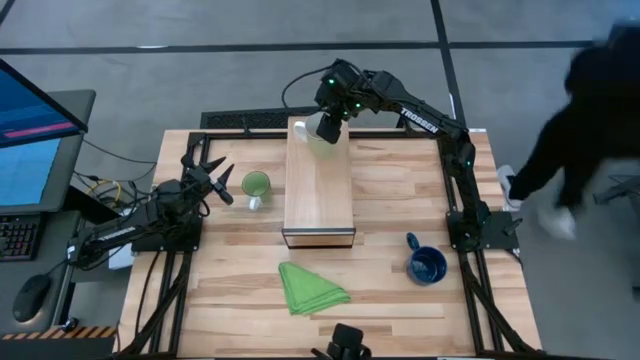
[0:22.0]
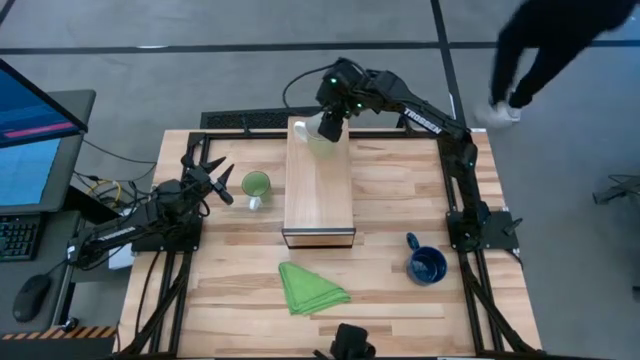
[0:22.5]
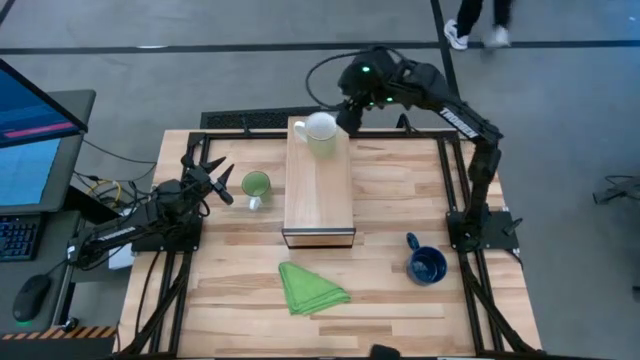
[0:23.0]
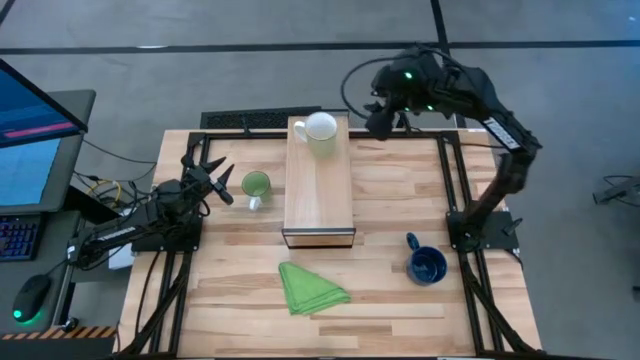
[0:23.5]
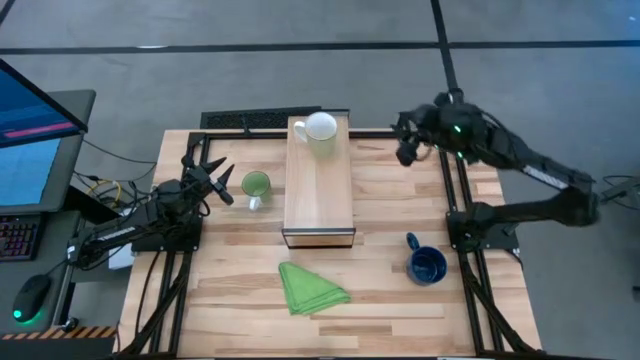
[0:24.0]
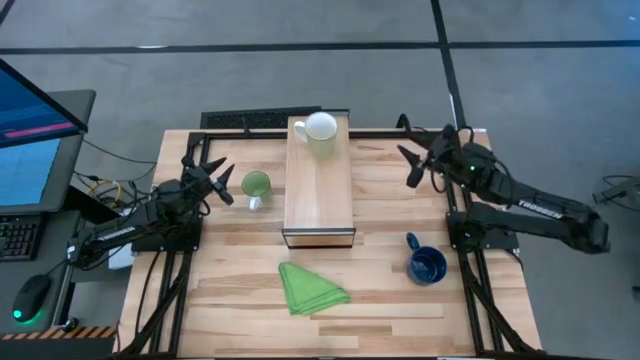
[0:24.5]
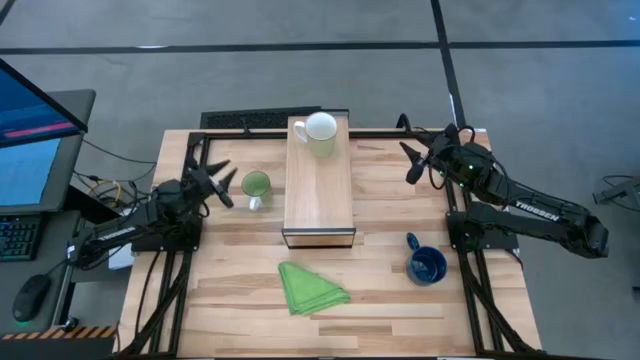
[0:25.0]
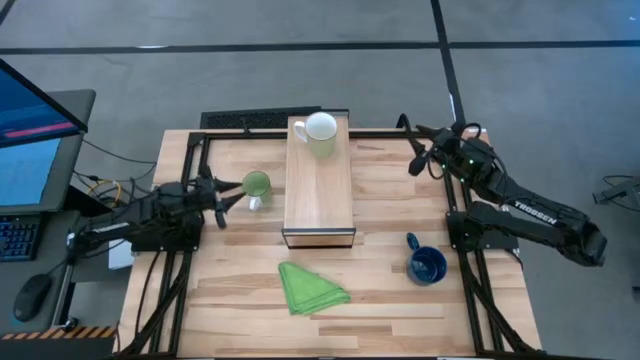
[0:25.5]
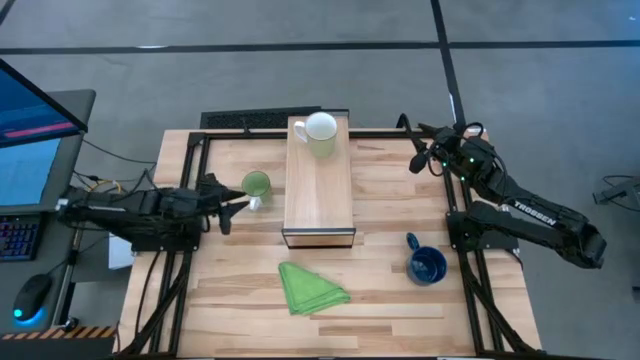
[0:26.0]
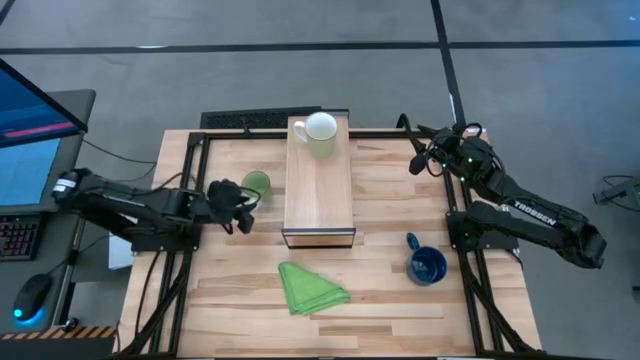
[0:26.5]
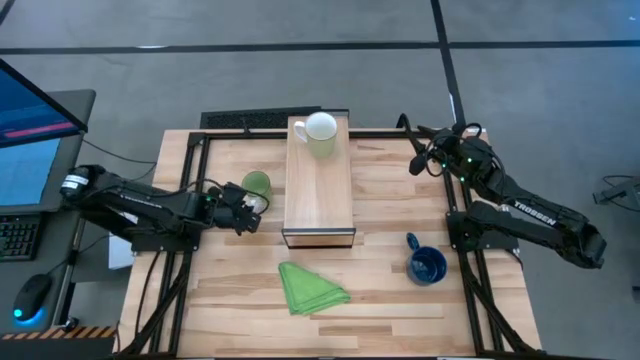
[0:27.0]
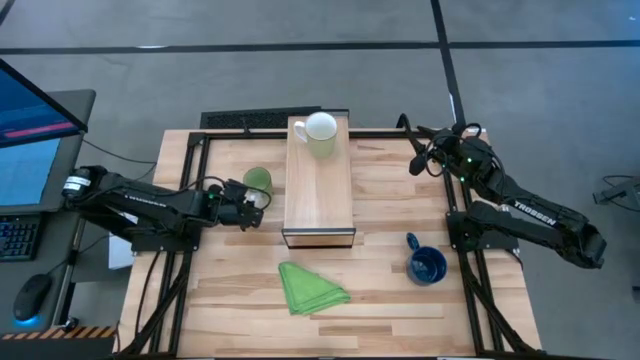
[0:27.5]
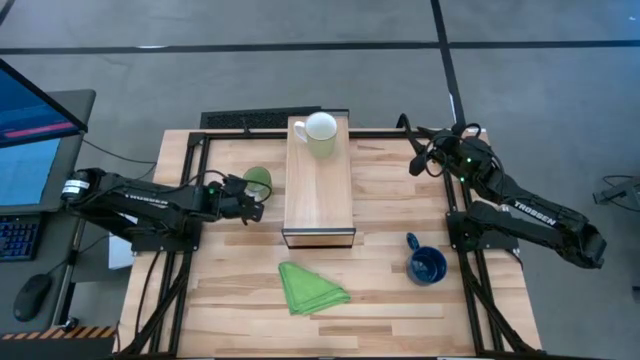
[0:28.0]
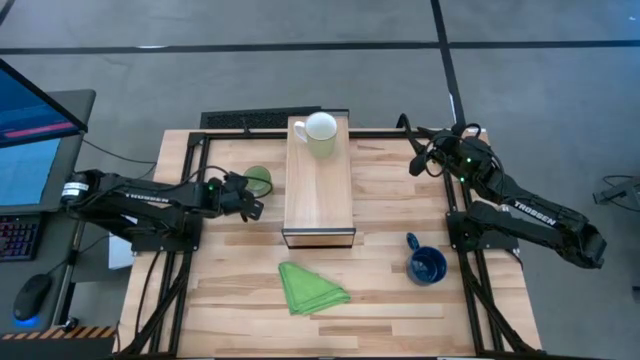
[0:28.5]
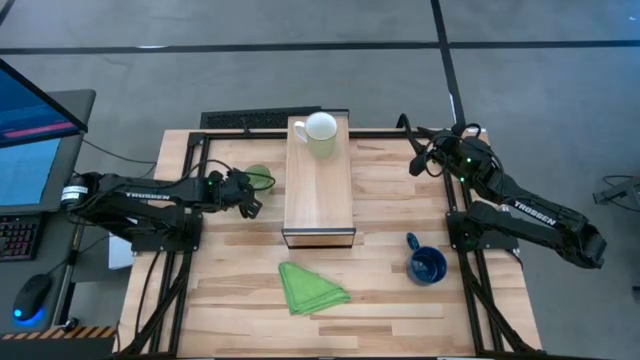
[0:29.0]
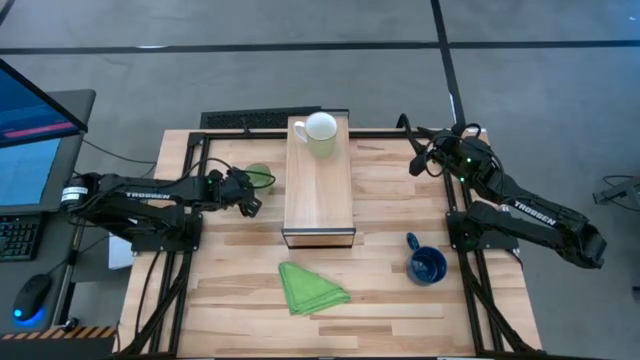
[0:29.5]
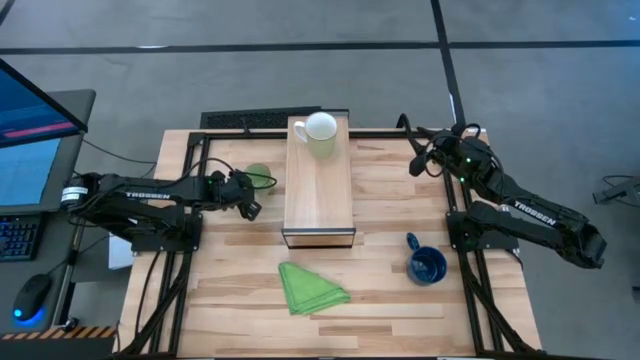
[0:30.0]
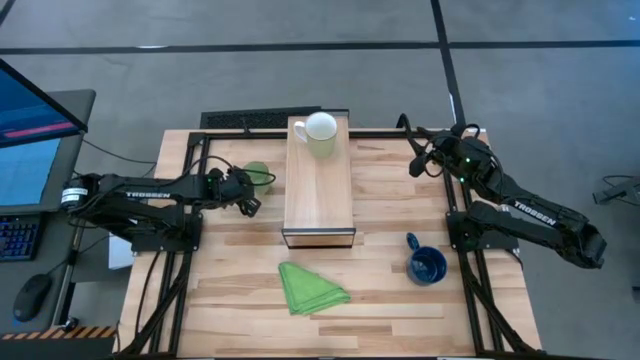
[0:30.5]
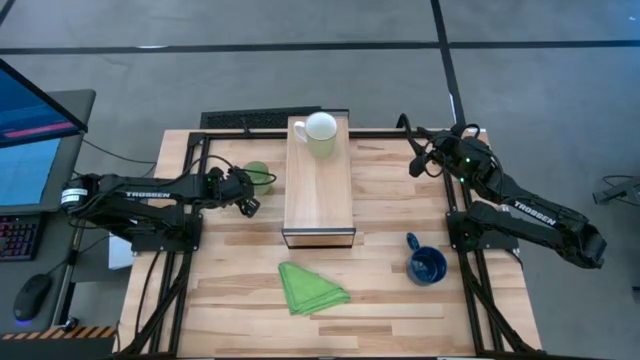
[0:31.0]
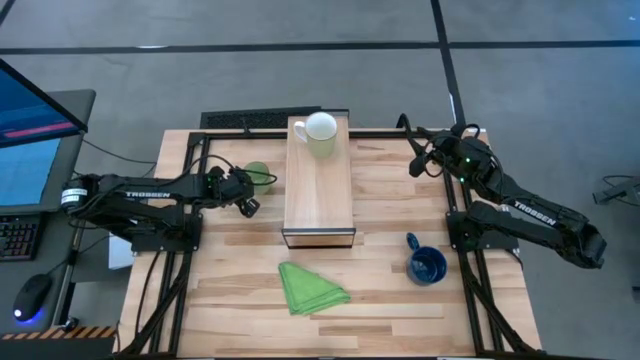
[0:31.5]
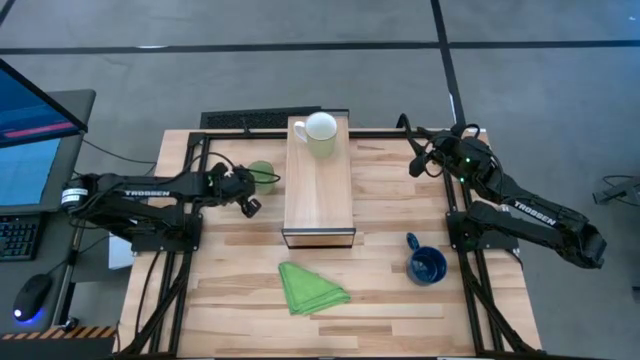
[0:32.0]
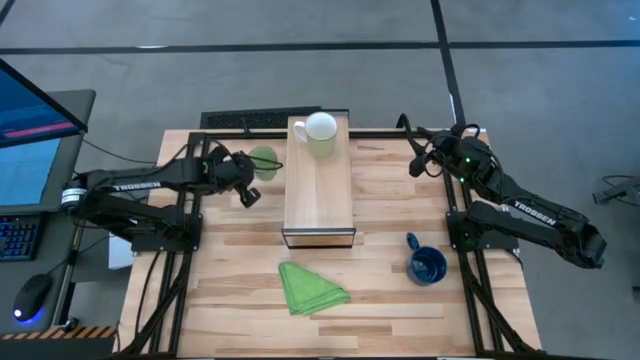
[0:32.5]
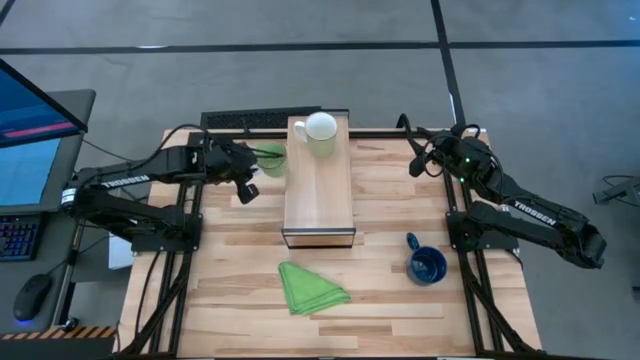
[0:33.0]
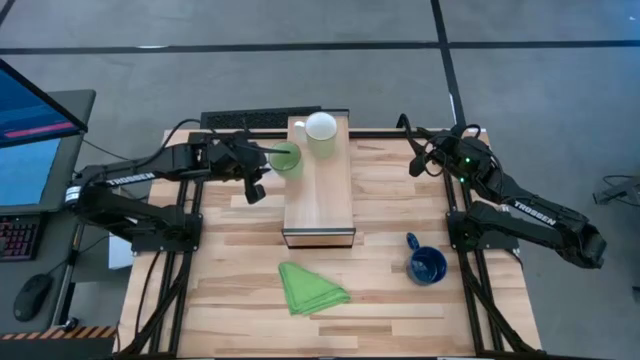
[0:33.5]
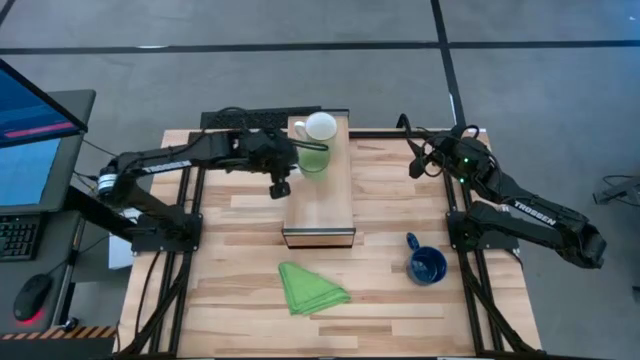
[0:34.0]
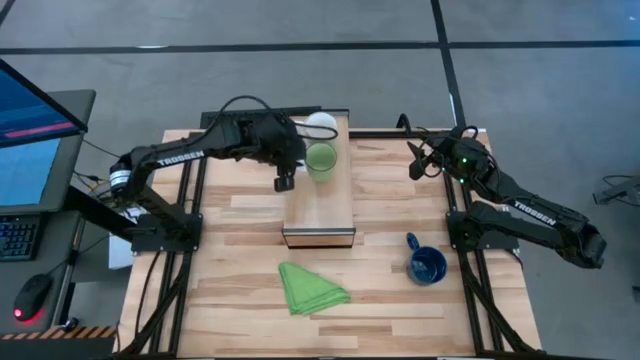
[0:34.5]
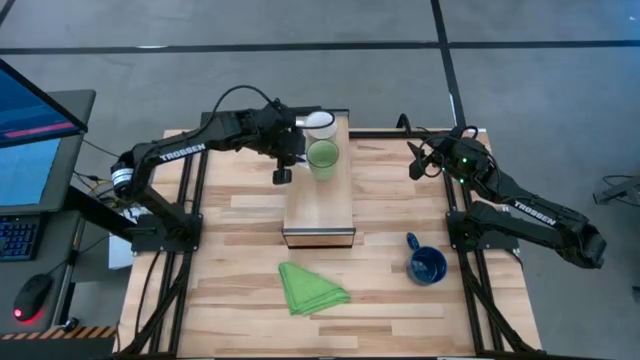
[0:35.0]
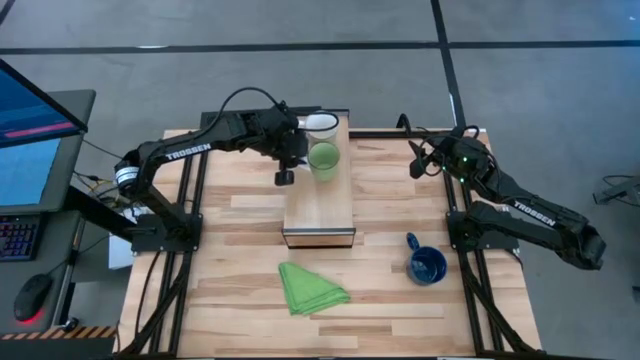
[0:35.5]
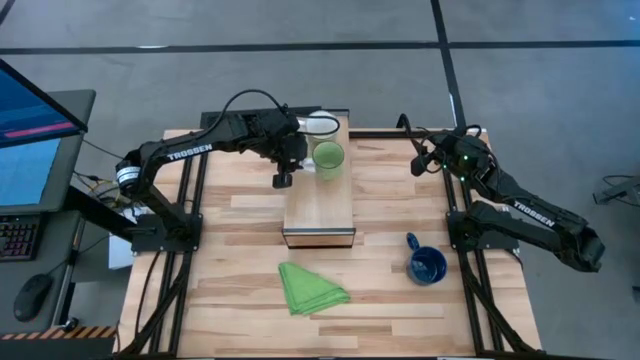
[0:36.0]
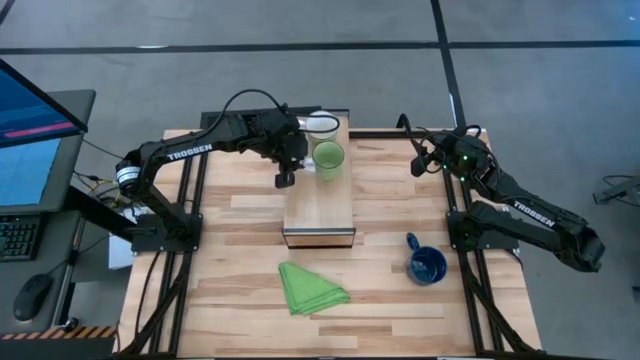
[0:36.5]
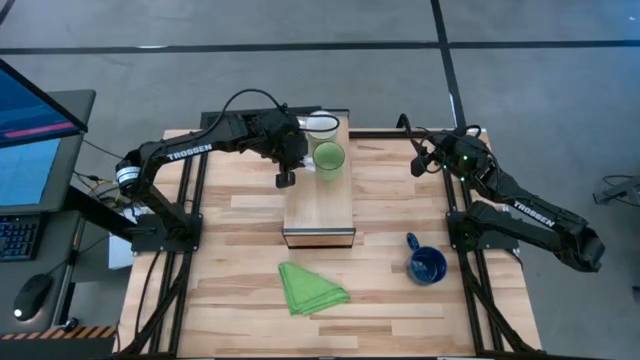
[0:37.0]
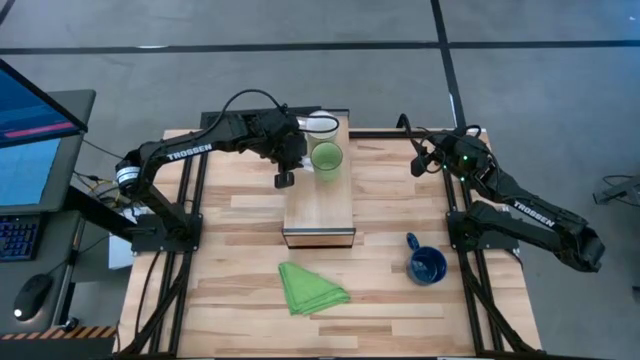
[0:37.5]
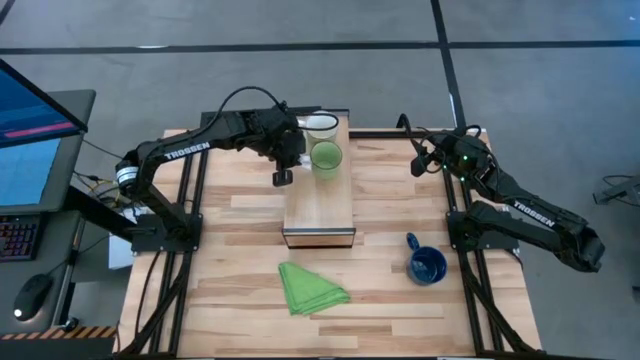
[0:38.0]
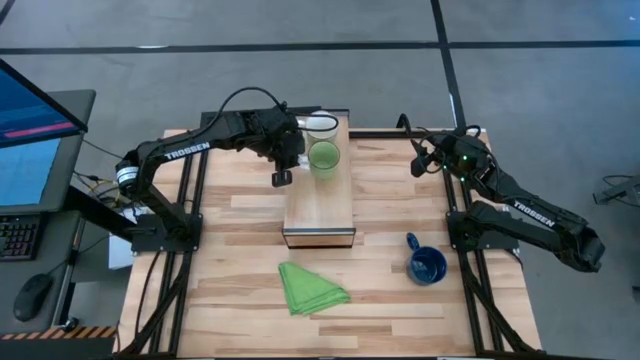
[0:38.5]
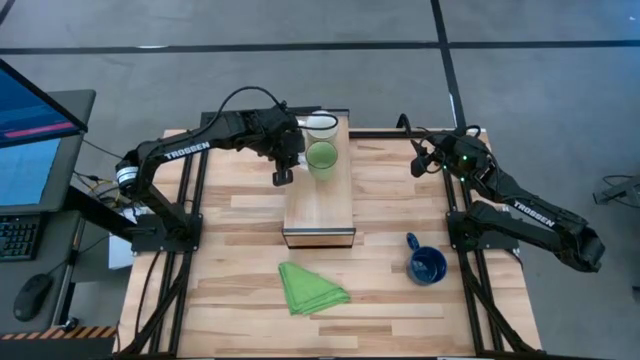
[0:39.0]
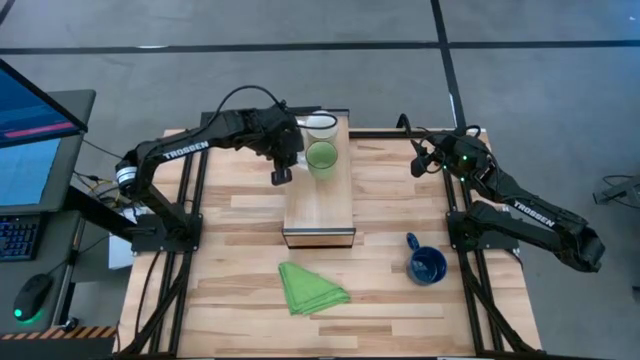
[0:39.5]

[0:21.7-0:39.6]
Task: Stack small to large cups/mugs on shelf
Put the green mug on the shelf

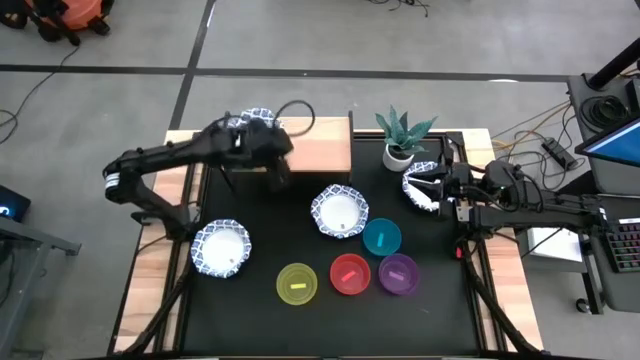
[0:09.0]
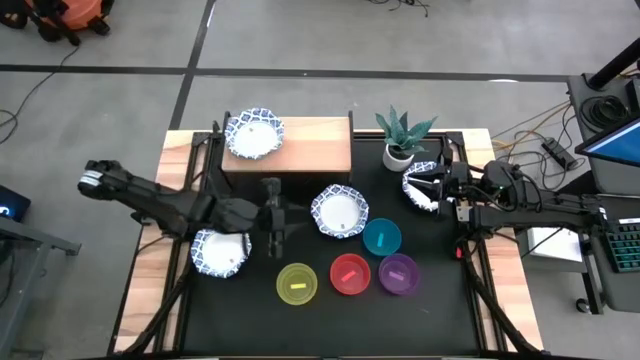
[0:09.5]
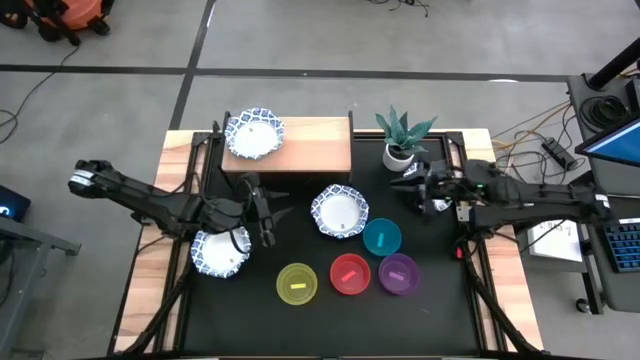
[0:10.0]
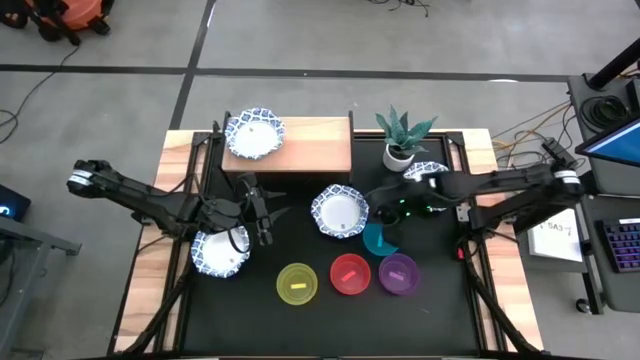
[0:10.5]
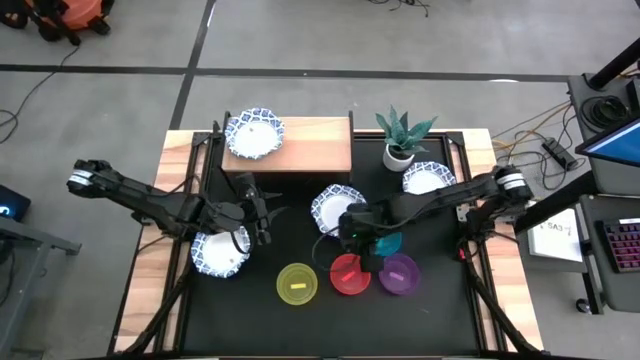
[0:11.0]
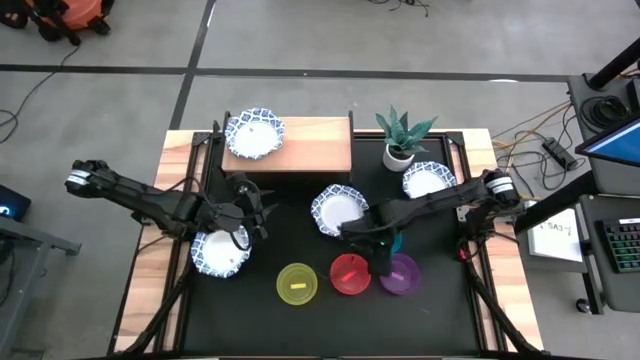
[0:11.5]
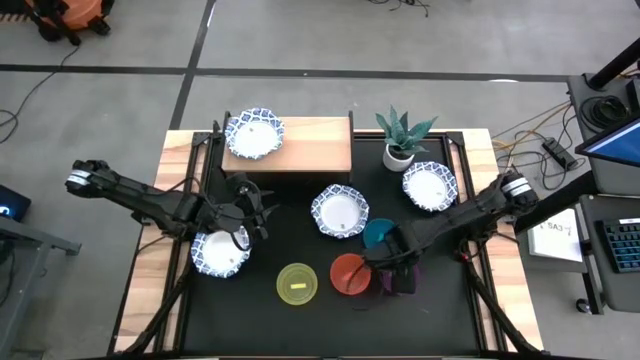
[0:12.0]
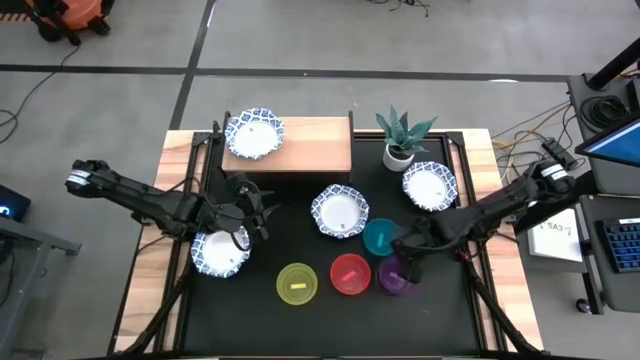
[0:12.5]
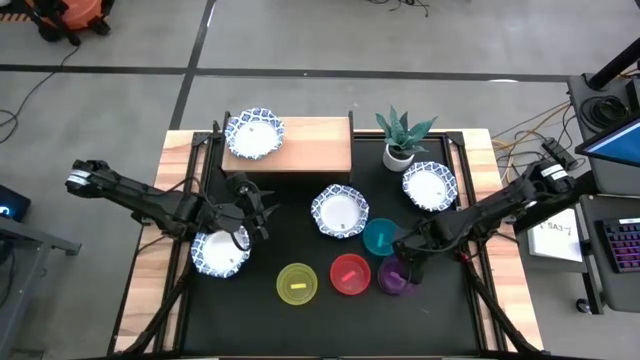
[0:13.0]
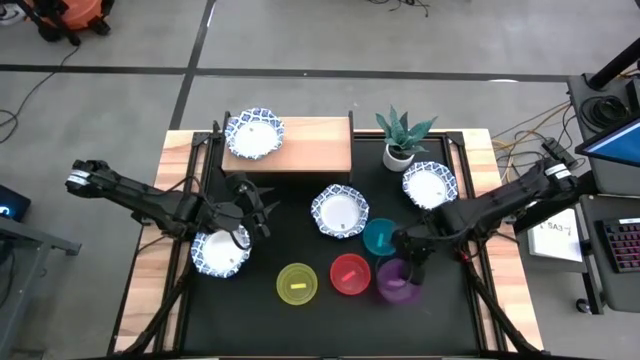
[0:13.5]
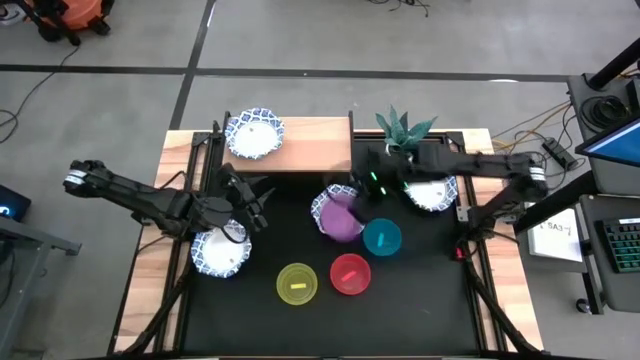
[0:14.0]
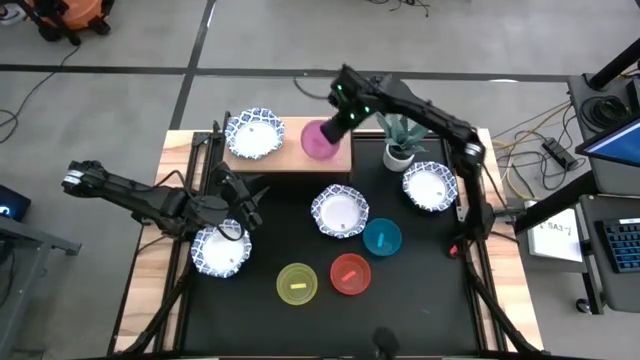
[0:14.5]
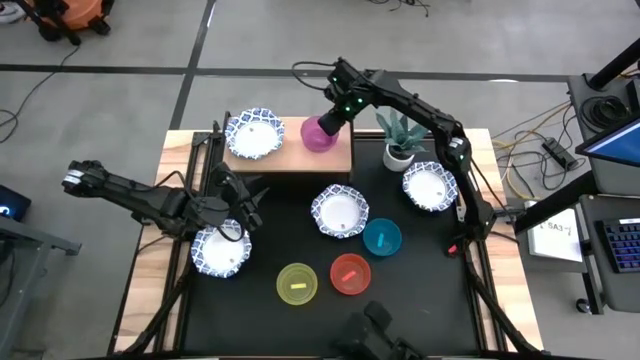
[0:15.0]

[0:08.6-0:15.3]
Task: Place and stack bowls onto a shelf
Put the purple bowl on the shelf
